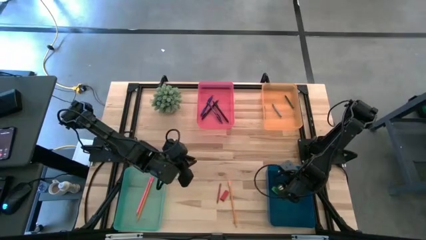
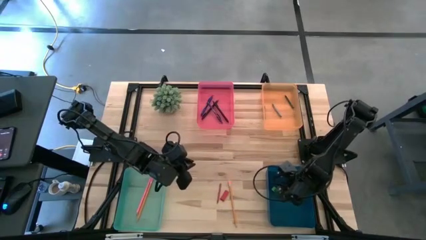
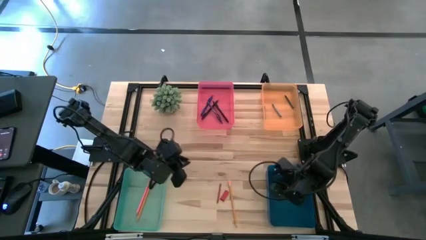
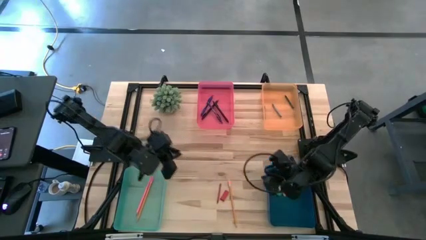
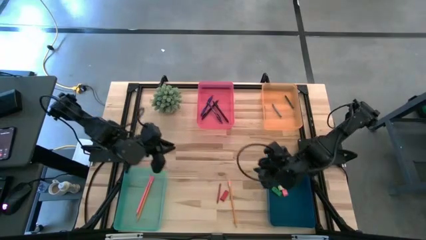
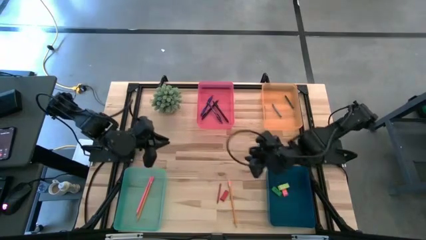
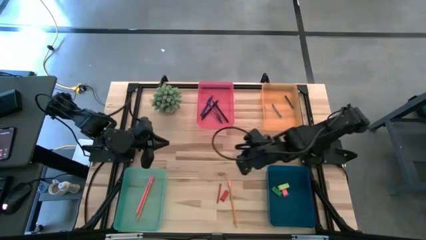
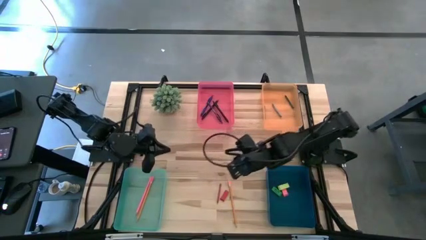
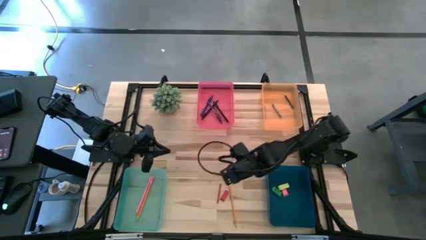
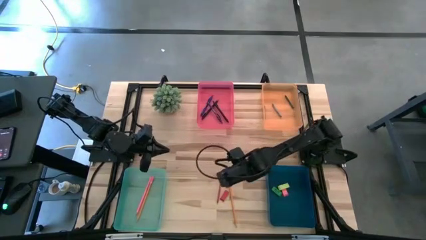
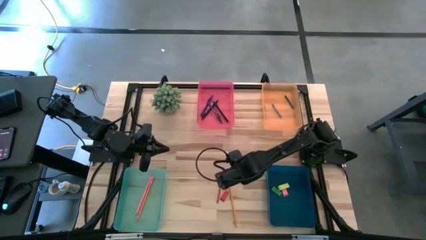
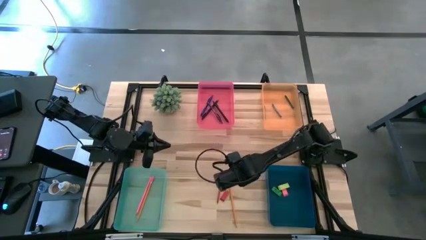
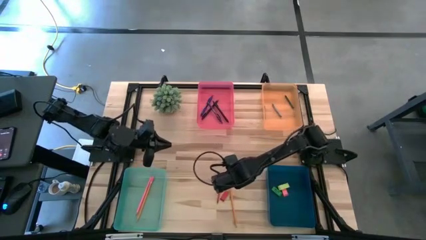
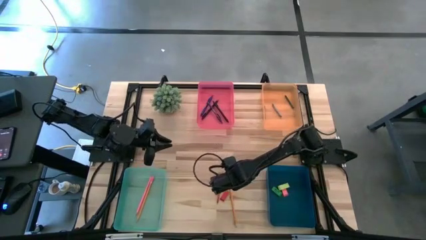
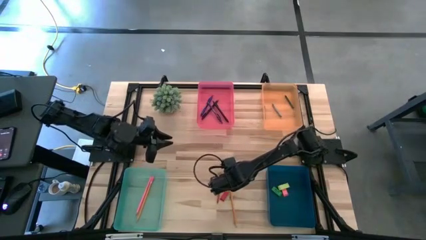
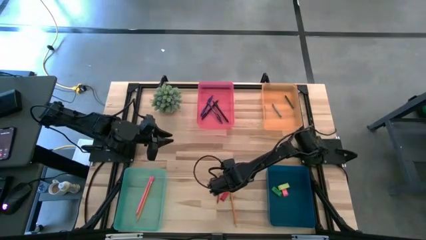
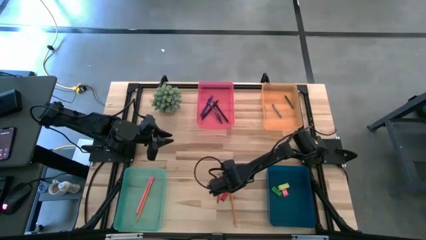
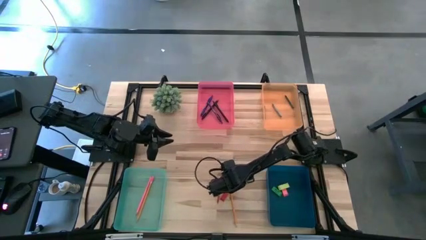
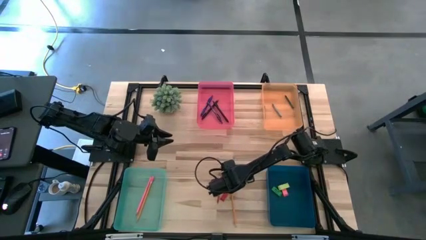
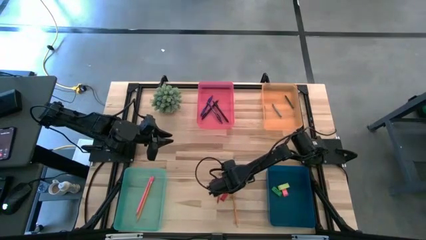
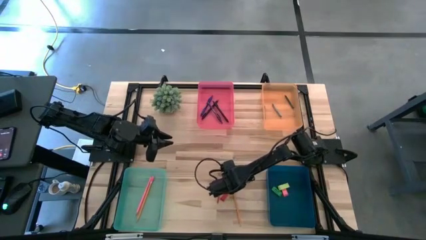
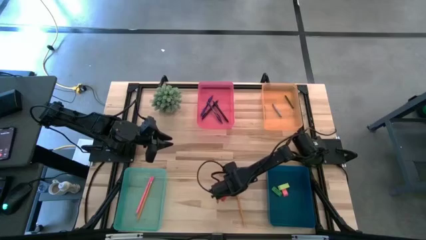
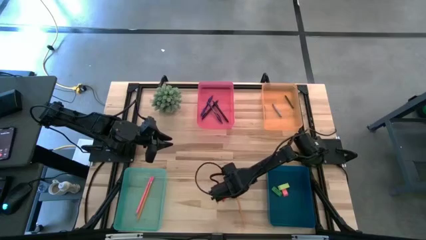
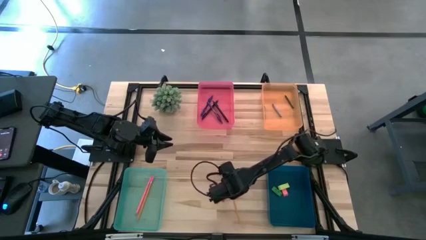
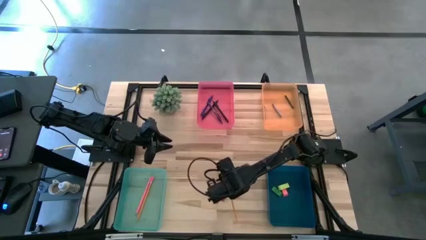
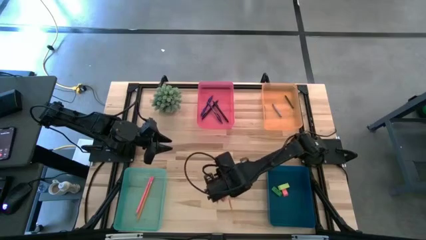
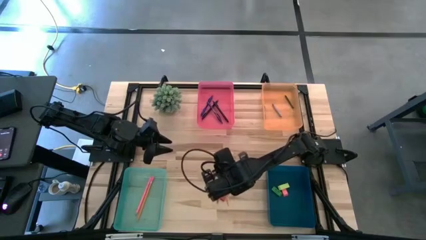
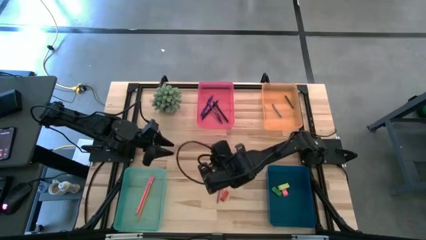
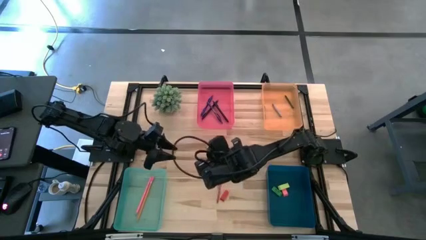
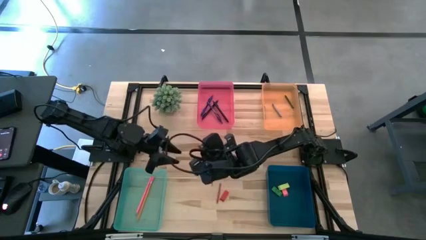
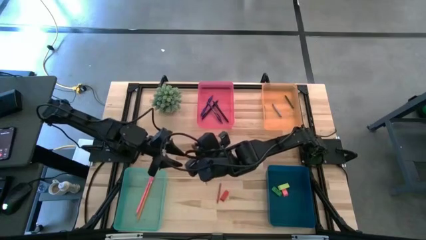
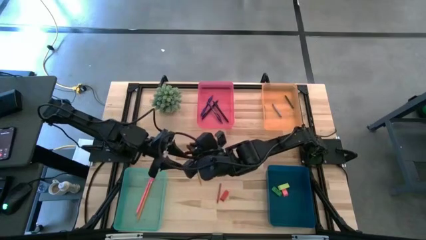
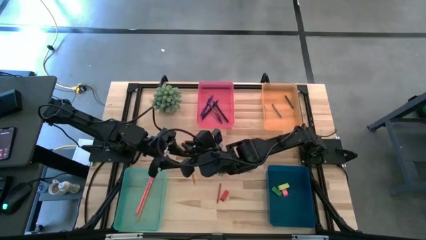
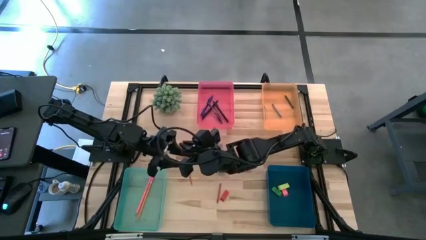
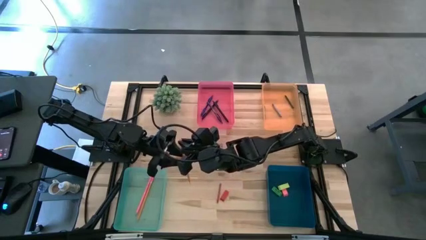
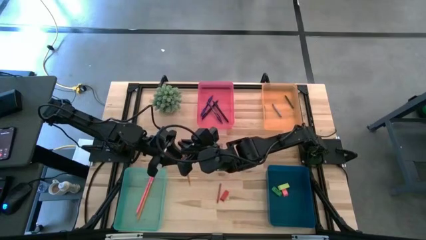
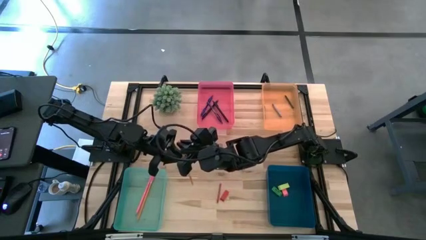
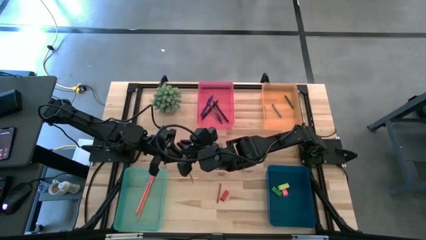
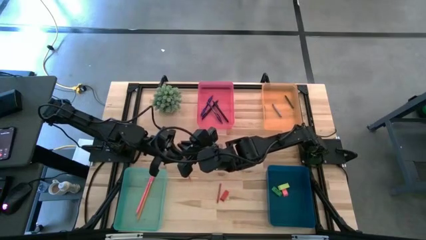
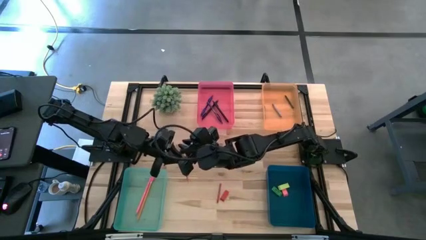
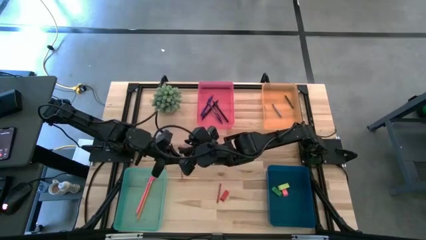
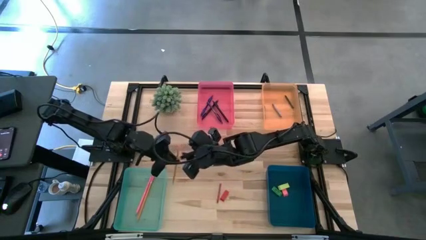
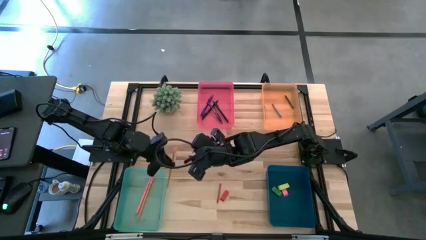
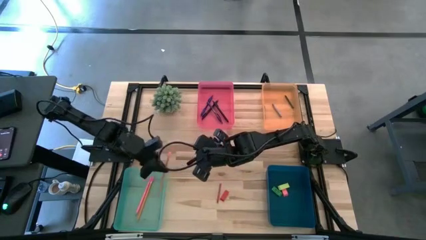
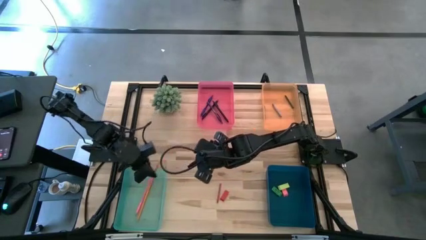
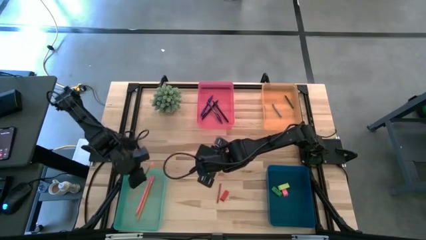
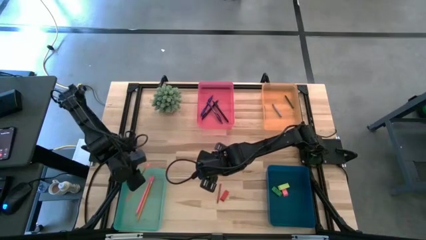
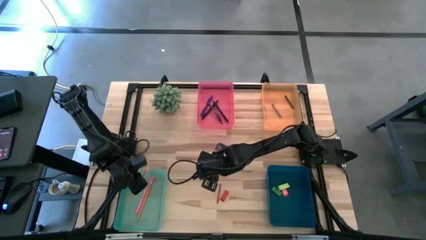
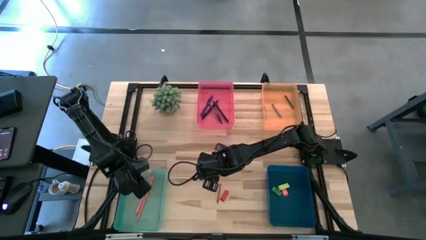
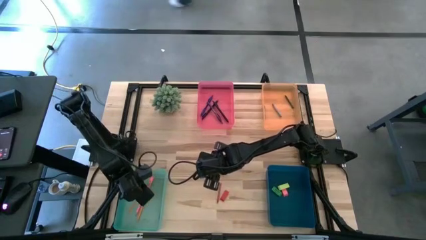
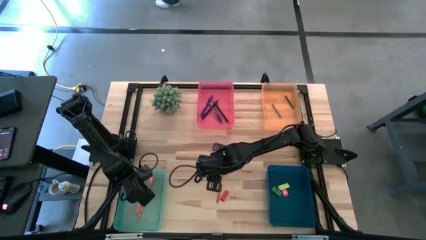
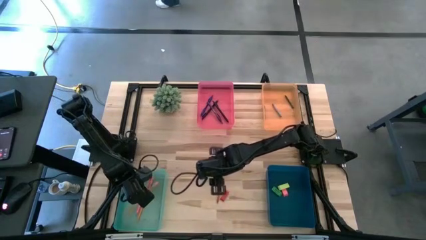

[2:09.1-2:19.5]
Task: Sort crayons/erasers/pens/pencils in bins
Put the orange pencil into the green bin

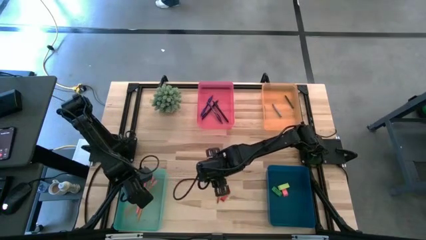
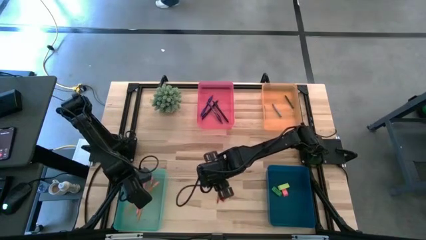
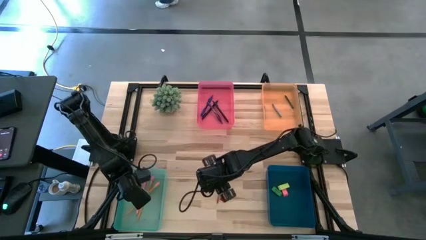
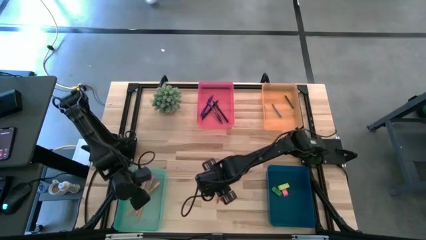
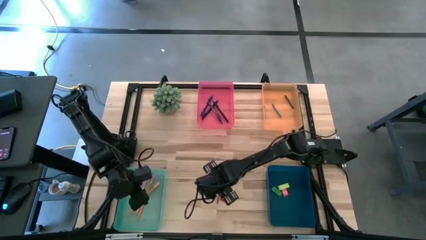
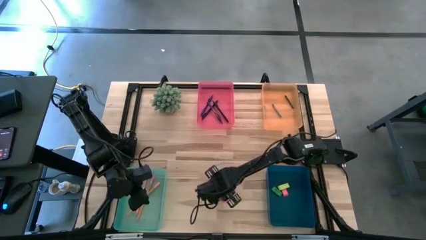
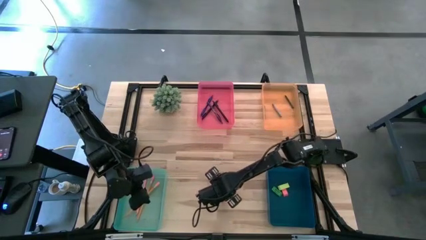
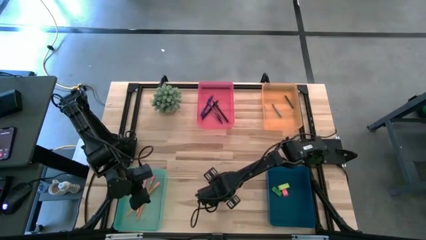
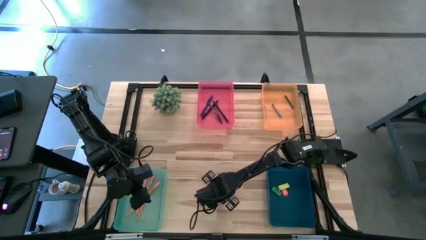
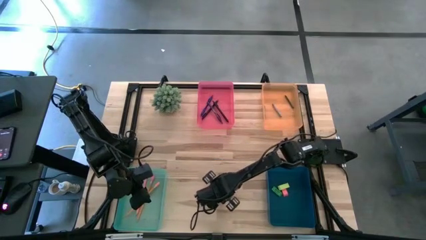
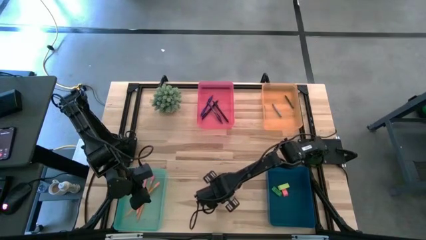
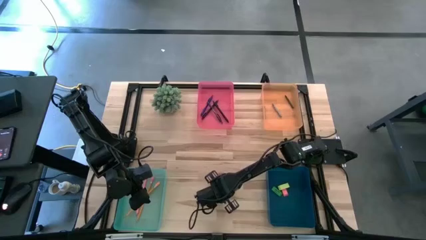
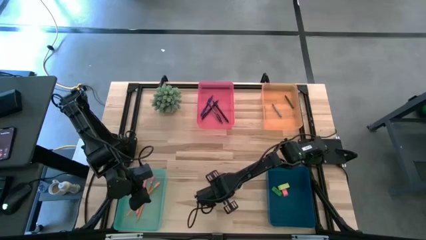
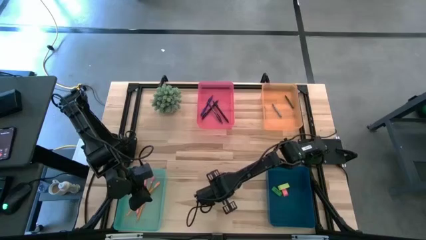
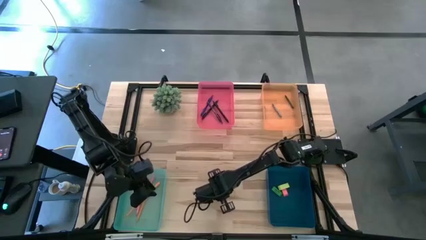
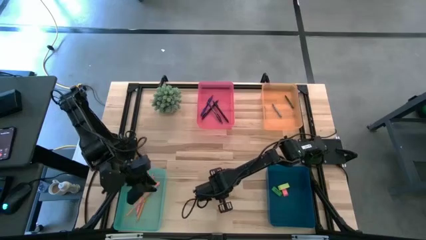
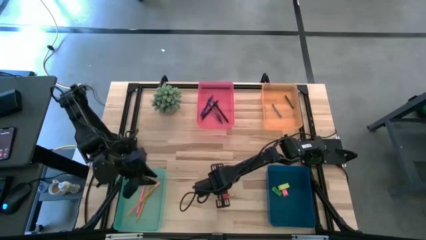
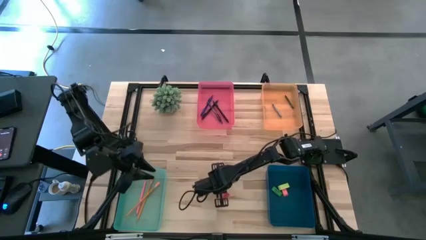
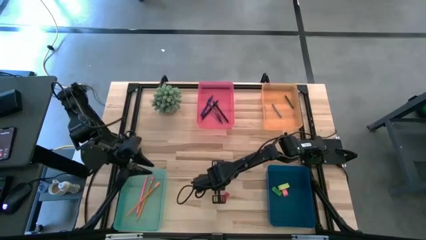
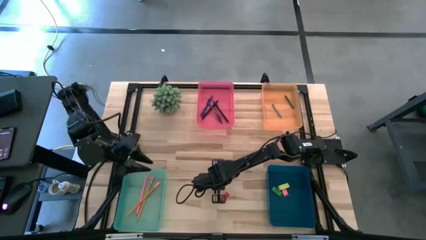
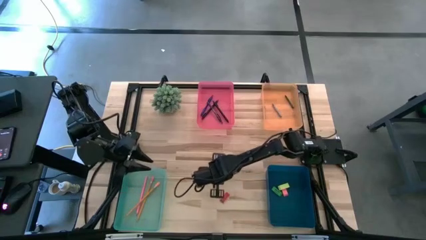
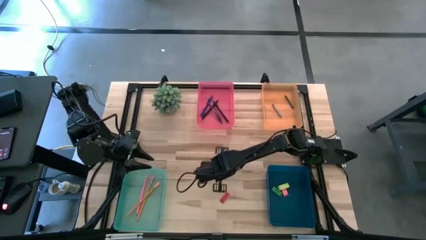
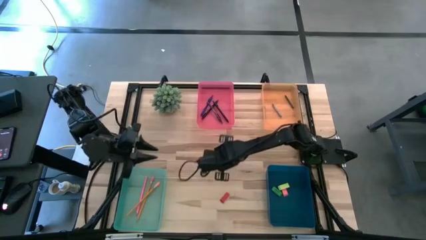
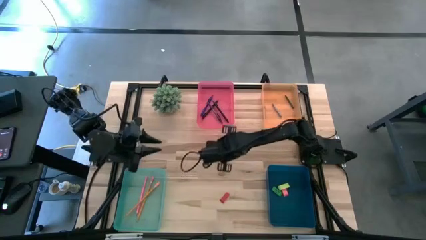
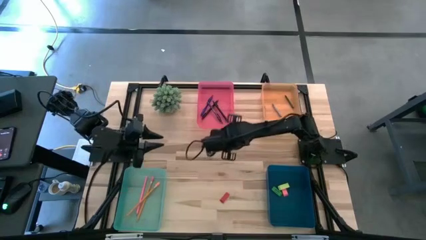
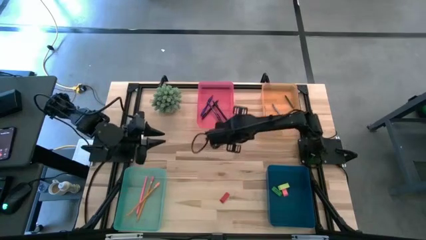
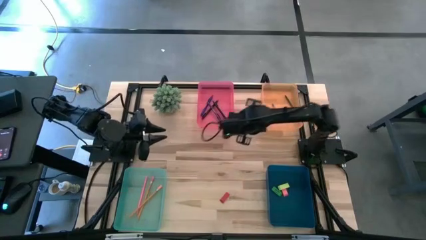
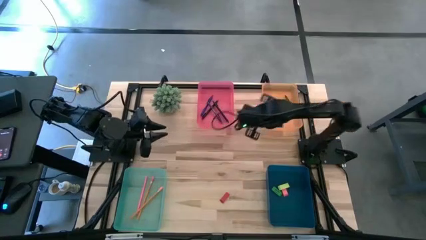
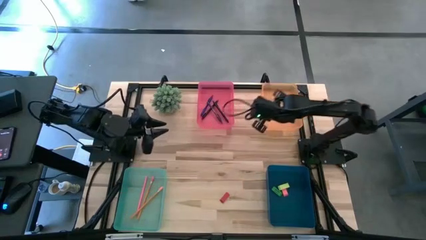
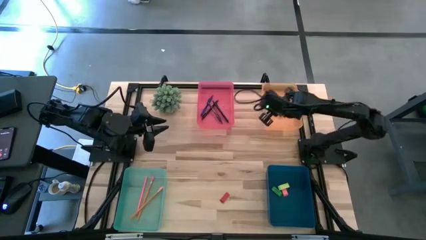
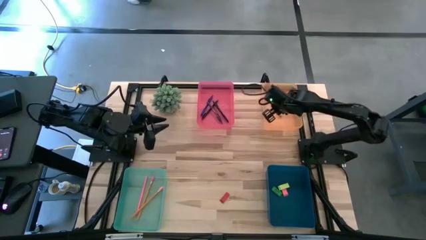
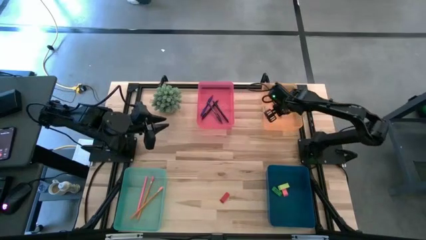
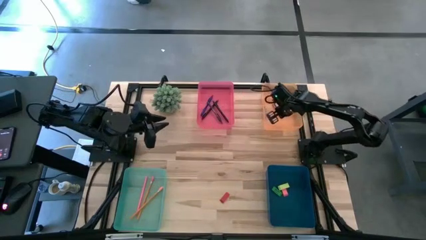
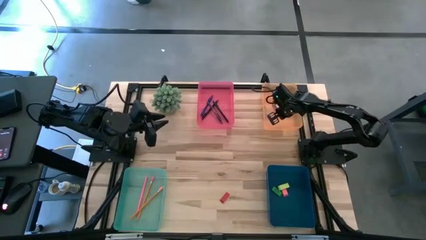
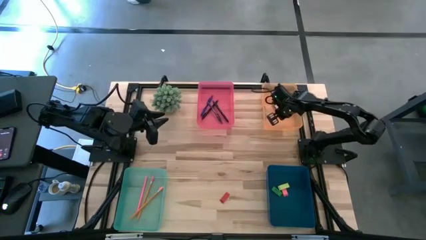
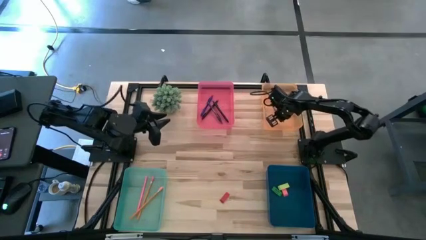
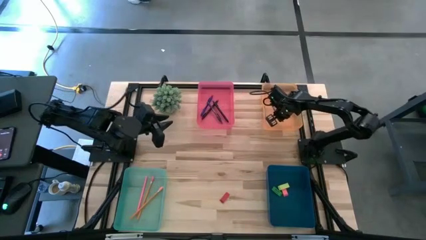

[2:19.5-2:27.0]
Put the red crayon into the orange bin
